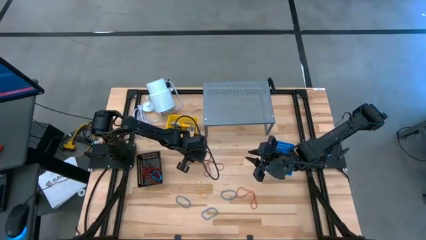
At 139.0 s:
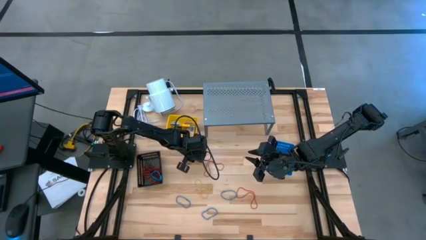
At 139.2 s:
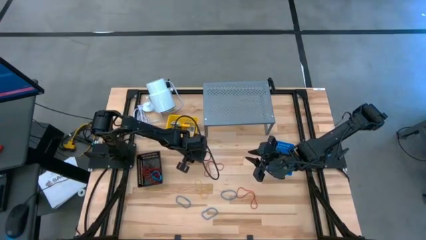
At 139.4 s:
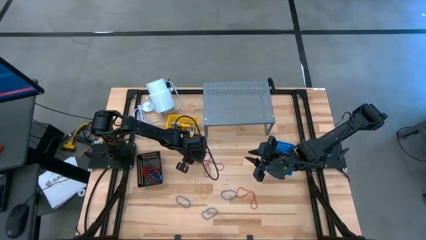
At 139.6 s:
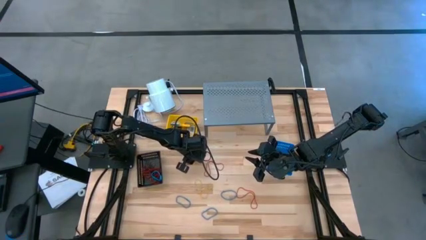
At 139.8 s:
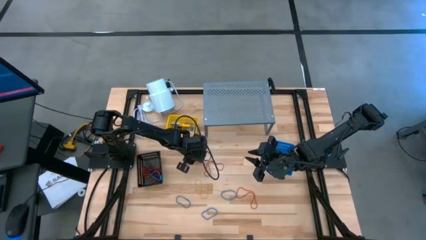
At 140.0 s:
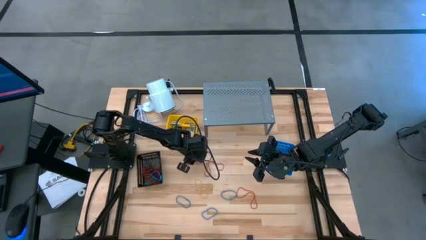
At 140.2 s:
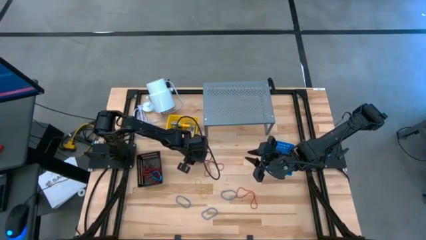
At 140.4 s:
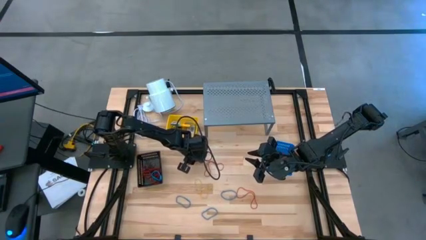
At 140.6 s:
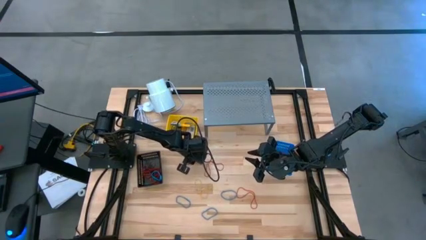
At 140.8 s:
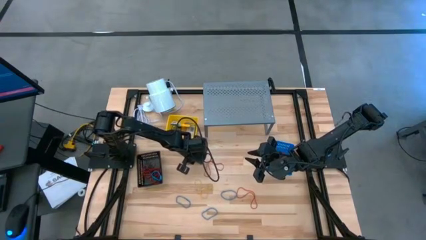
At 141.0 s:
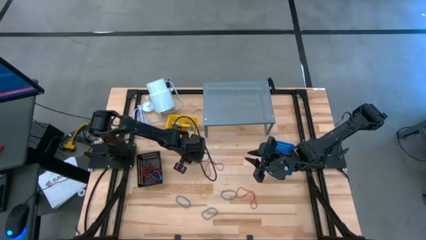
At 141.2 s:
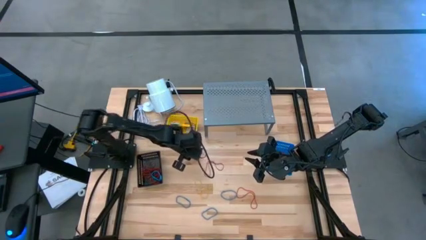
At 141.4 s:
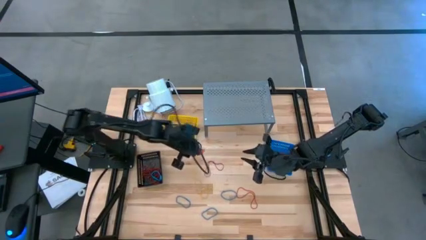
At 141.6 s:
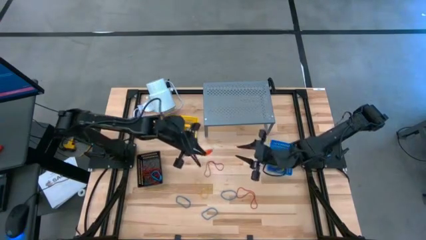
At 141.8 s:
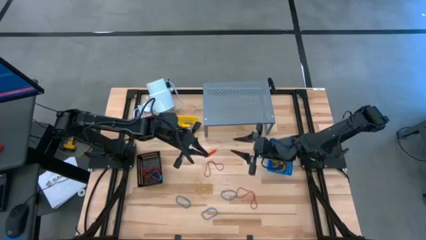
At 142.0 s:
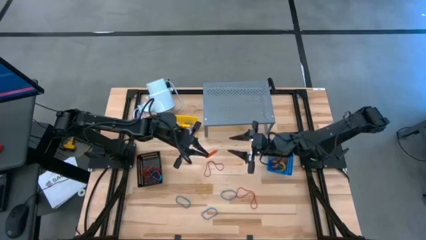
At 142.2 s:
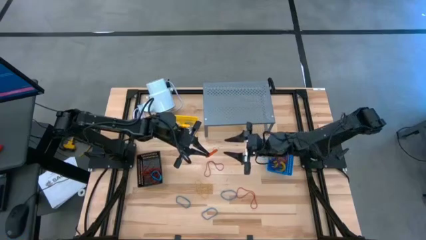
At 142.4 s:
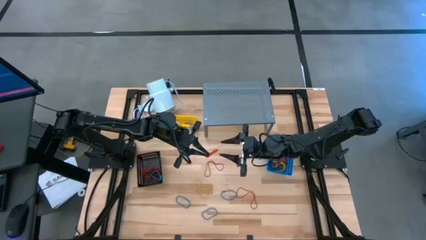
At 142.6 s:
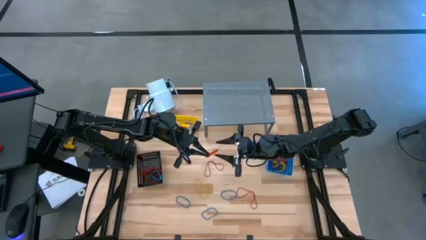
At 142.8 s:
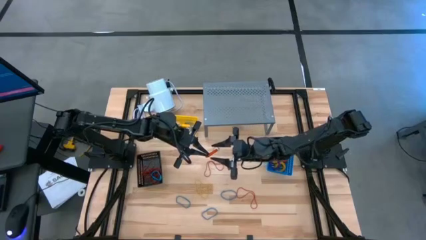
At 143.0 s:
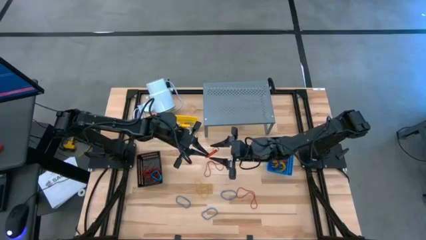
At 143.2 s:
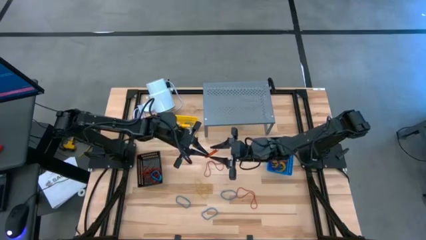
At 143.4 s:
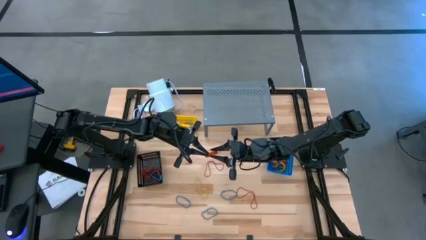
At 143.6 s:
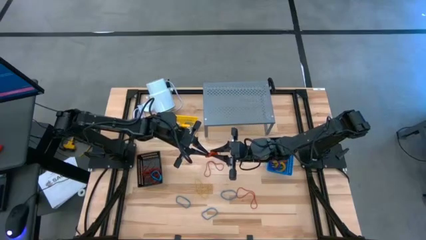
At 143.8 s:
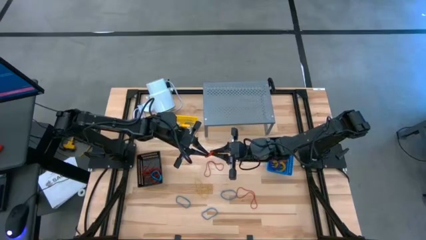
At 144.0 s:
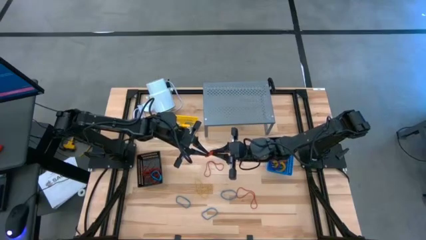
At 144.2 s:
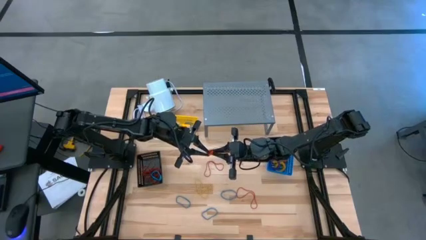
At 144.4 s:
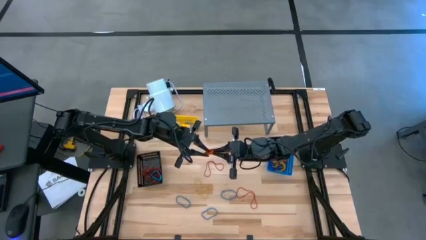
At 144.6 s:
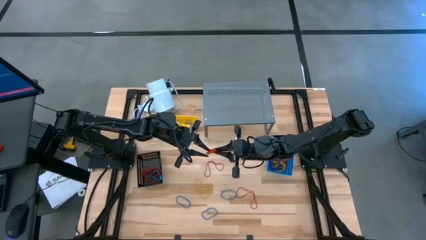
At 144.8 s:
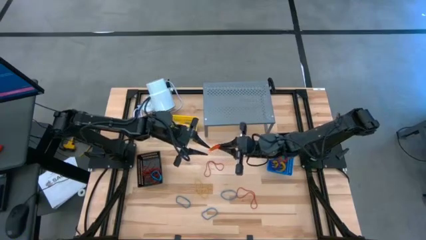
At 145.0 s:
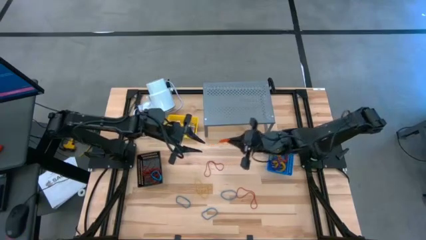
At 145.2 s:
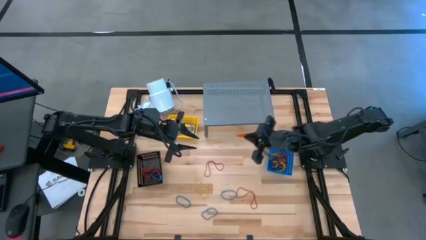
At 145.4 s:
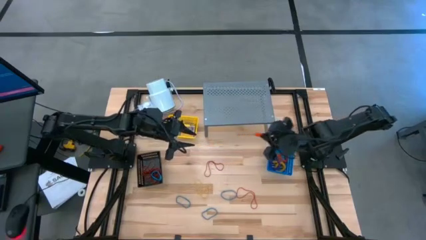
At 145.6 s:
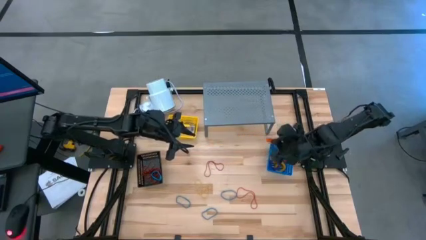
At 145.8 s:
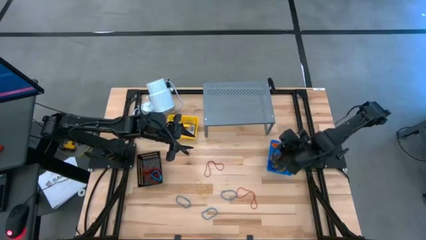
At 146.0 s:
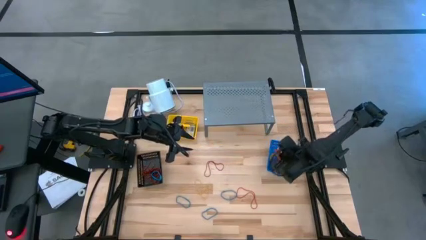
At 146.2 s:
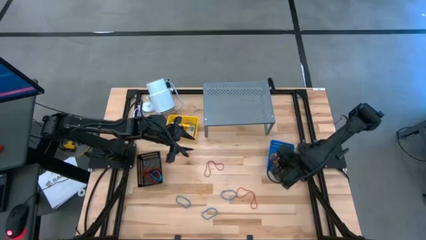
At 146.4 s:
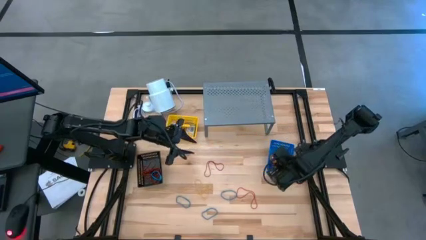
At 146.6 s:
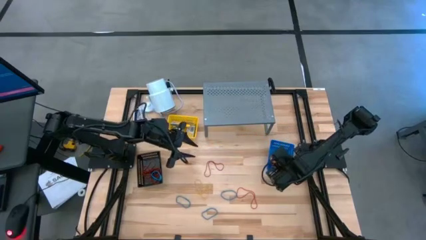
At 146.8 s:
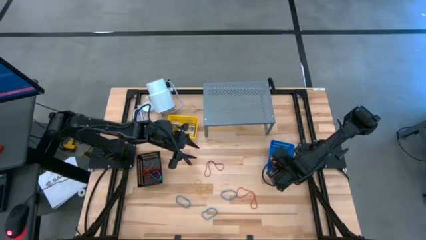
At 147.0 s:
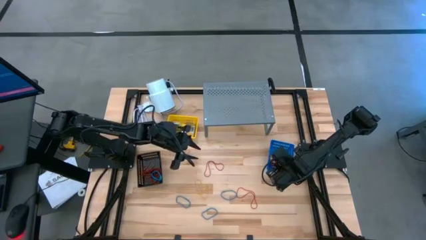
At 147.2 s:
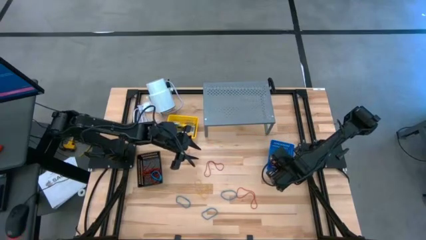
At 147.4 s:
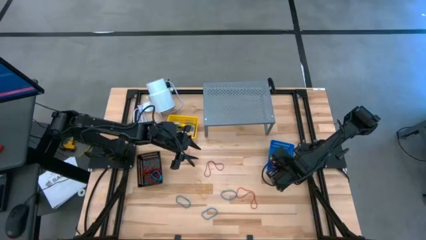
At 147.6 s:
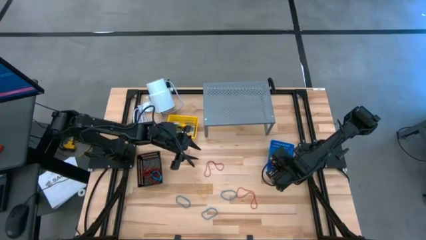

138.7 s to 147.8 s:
Task: Pick & Place Office Desk Supplies
Put the orange spring keychain into the blue bin

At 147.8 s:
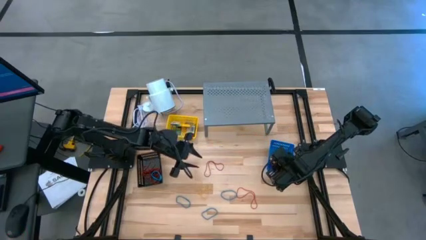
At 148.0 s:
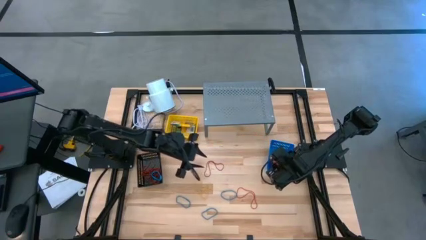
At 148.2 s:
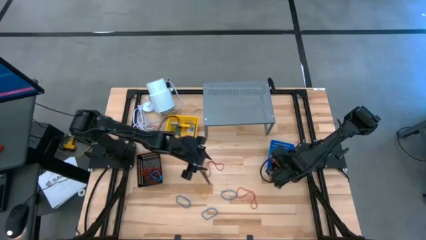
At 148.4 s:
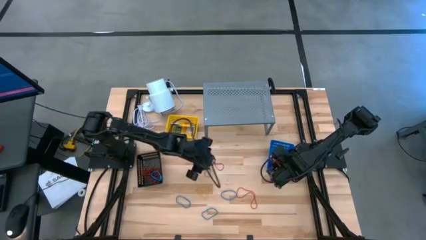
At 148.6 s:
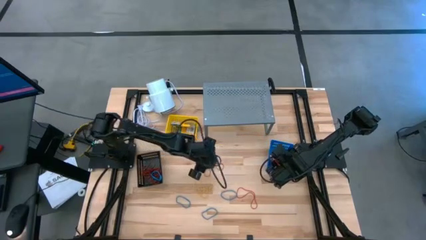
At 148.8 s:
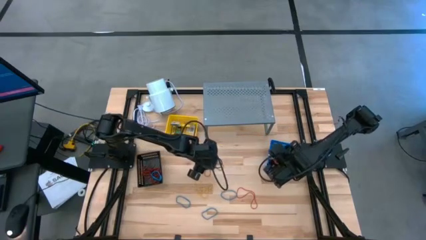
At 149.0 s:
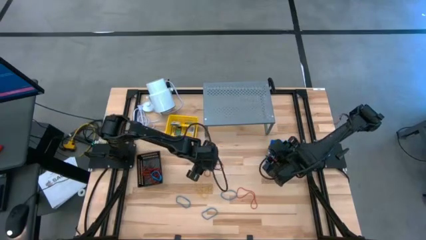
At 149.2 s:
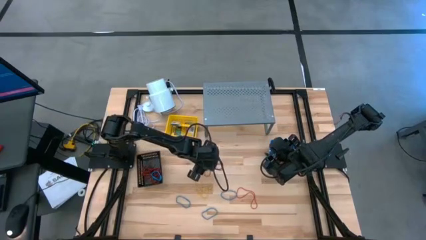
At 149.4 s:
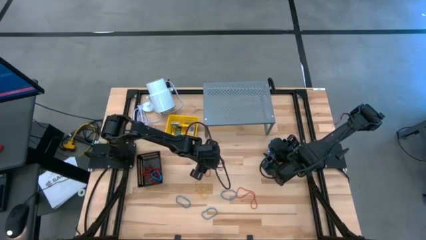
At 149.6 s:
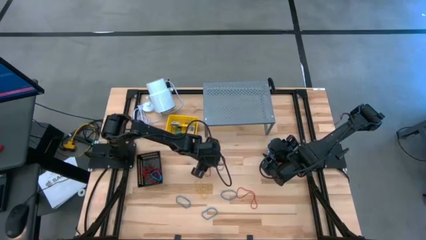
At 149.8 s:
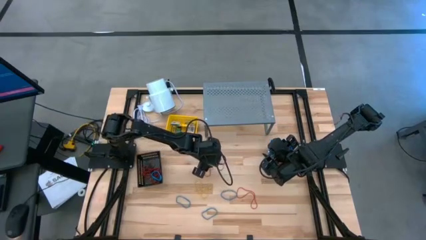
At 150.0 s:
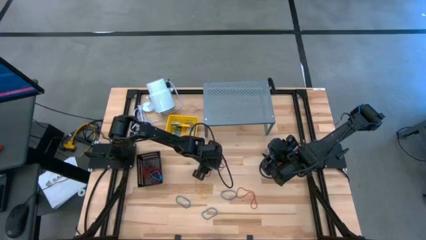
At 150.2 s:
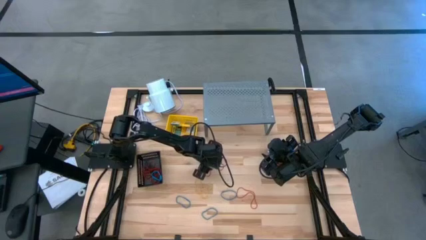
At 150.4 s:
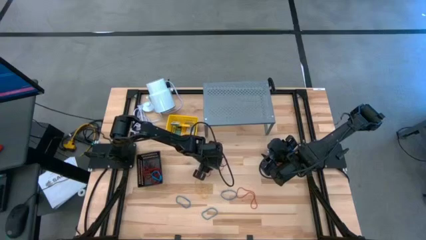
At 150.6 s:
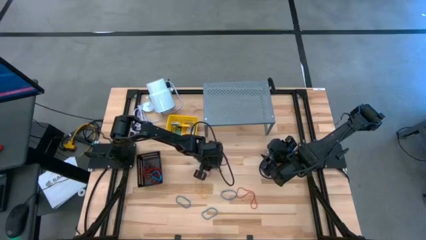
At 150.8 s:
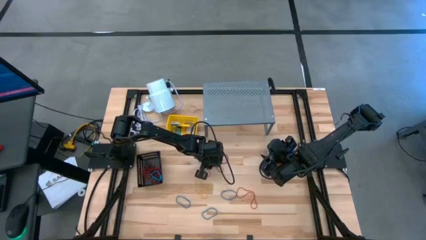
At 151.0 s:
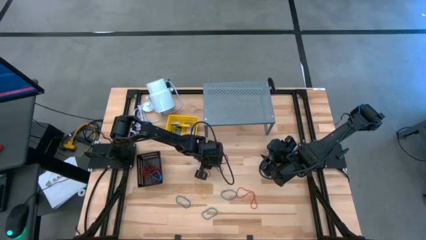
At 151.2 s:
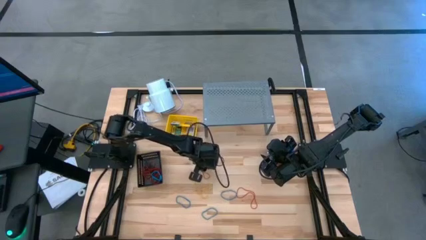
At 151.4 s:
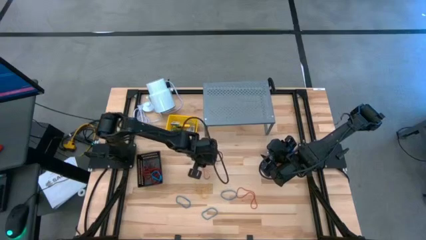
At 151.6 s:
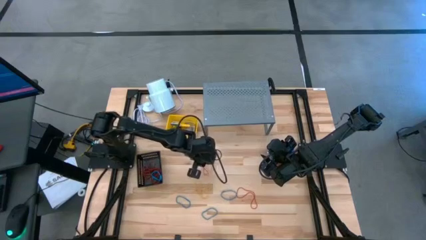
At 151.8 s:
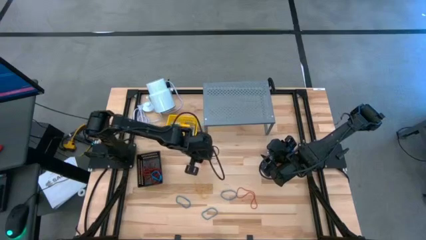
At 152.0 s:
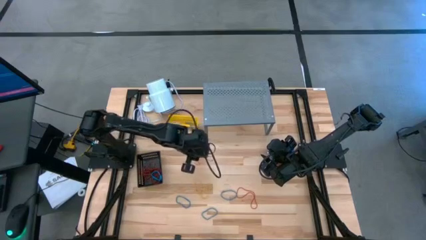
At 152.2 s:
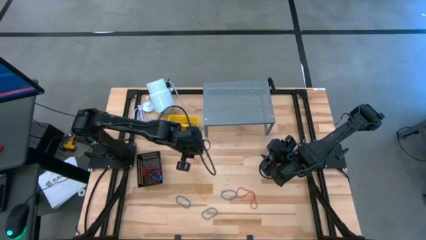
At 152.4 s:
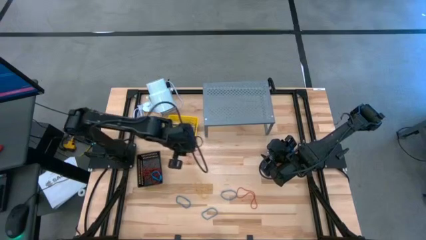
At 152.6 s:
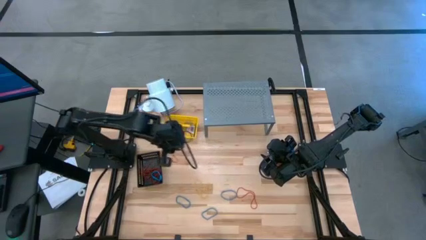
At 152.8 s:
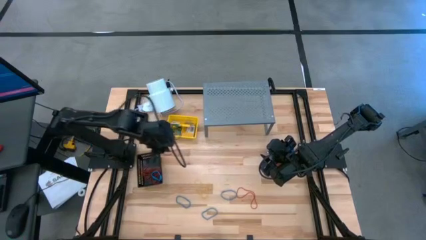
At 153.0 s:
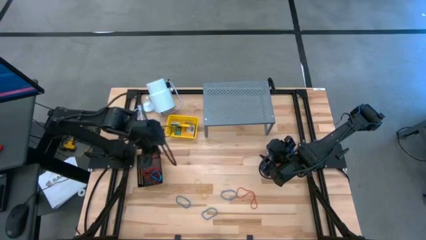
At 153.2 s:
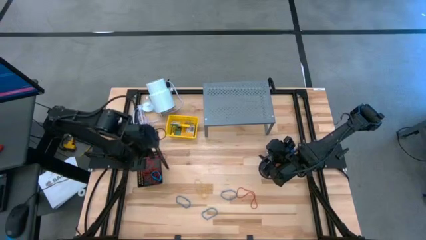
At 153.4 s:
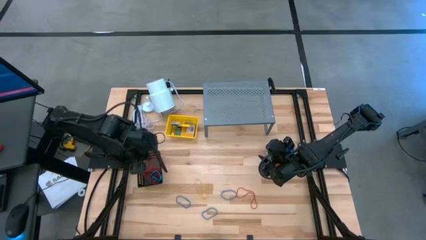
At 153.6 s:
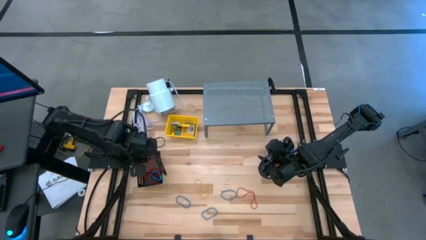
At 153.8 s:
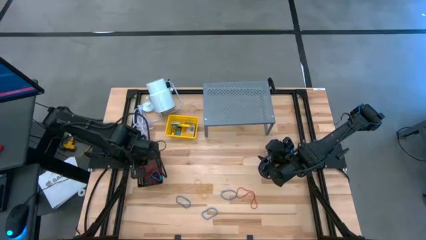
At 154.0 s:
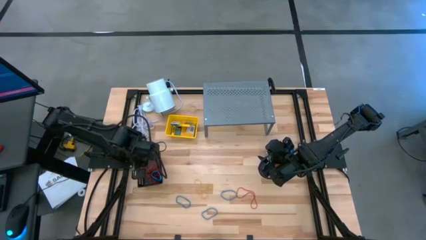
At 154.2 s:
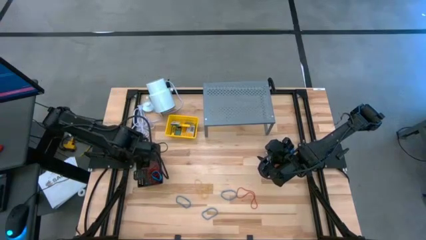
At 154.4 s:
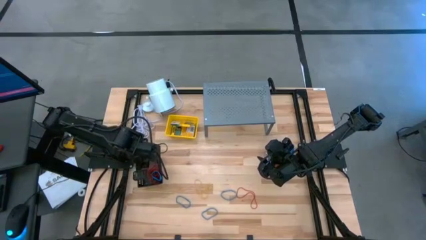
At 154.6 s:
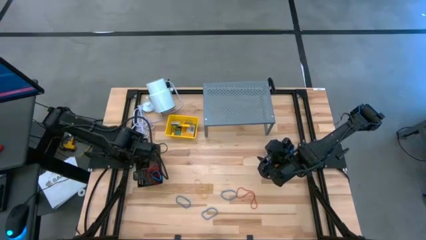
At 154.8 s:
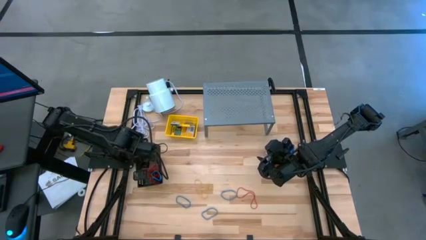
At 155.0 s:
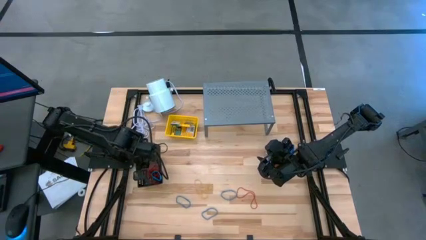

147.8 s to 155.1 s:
Put the red rubber band into the black bin
